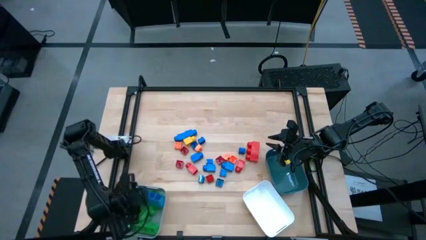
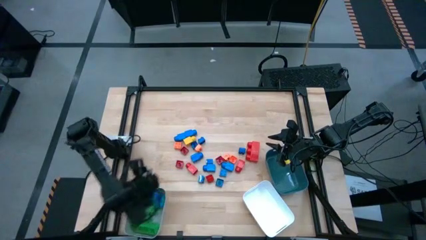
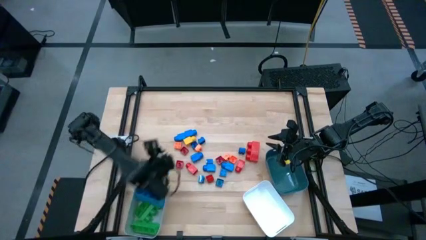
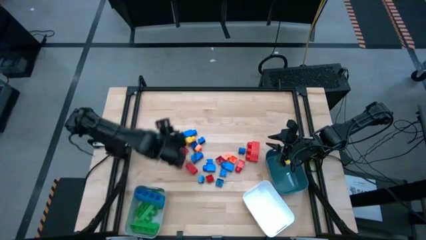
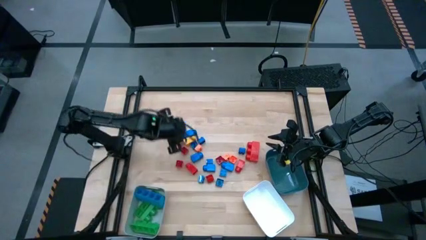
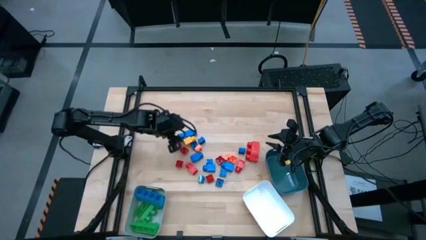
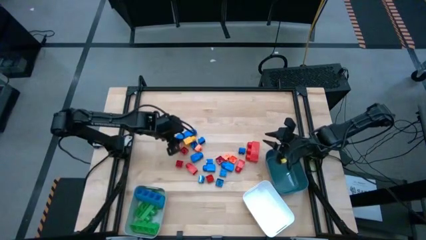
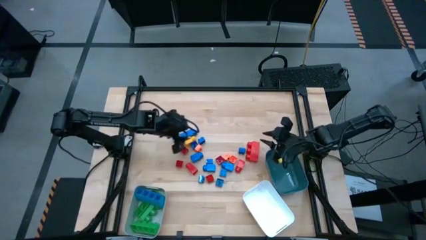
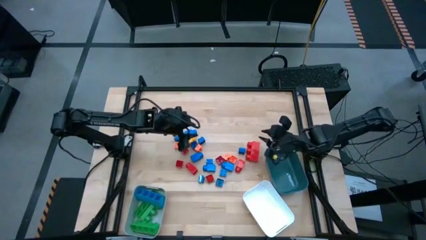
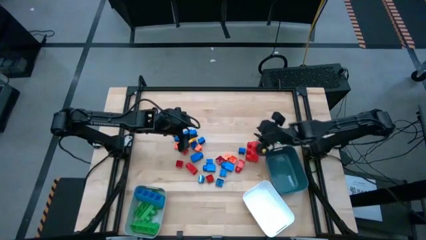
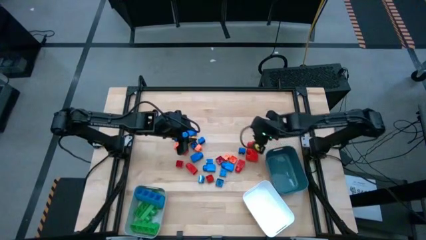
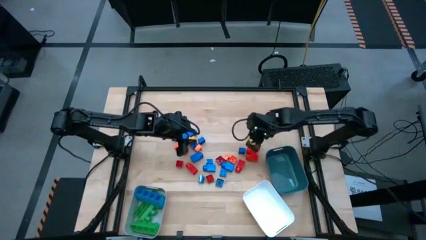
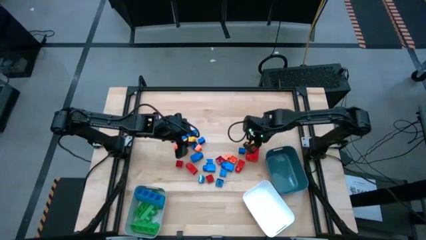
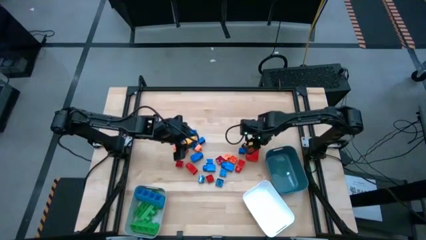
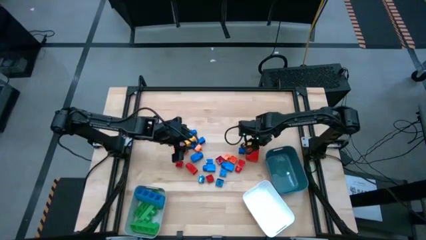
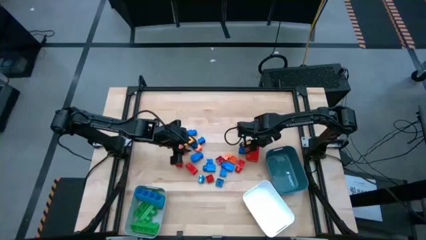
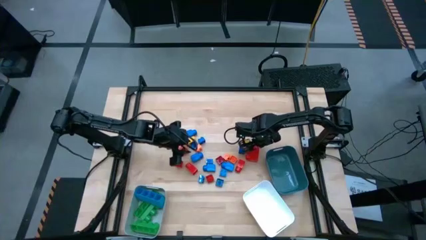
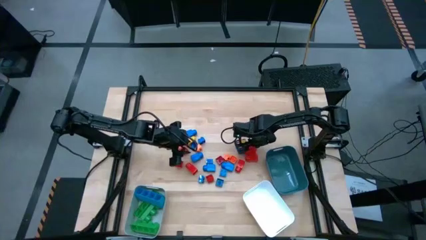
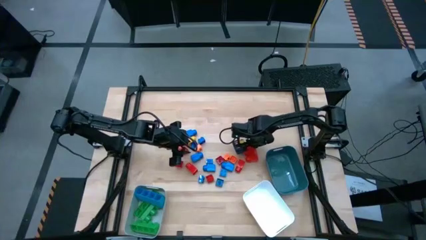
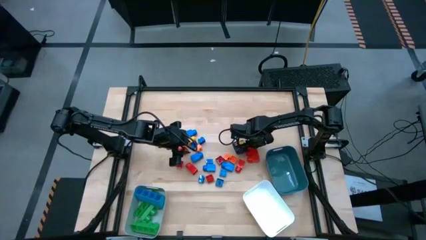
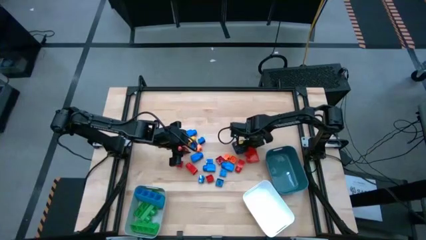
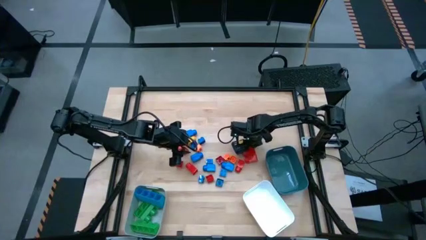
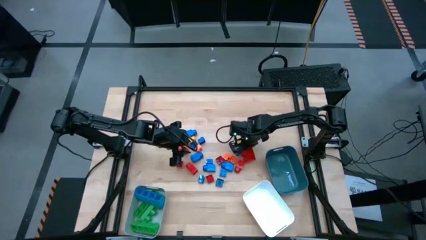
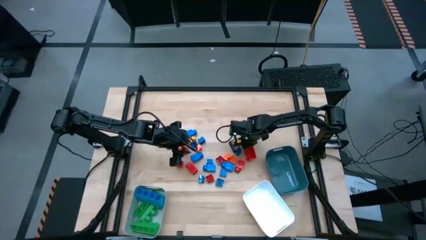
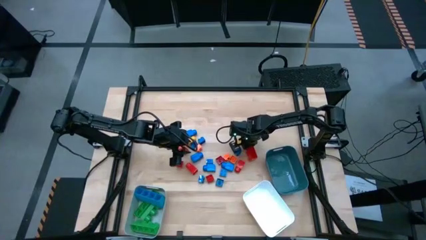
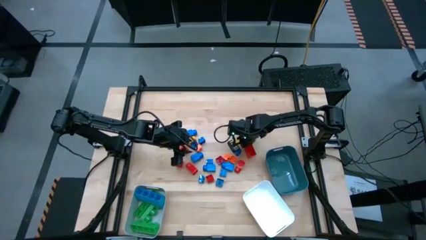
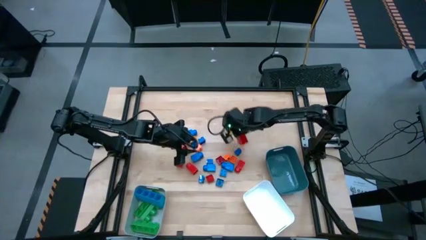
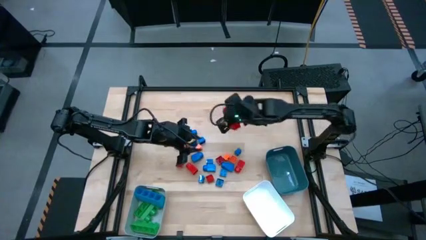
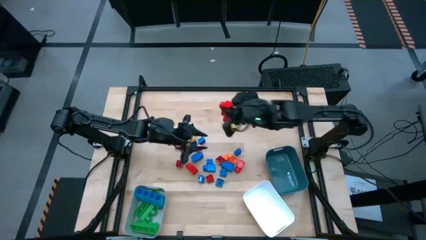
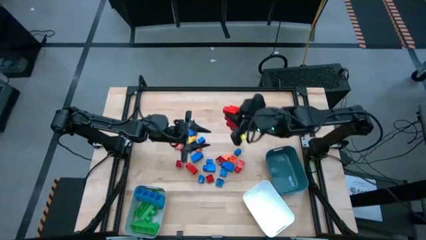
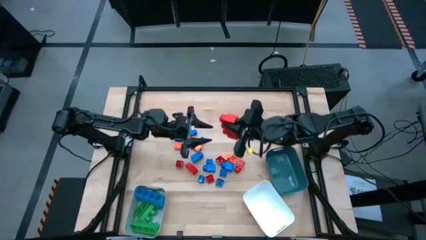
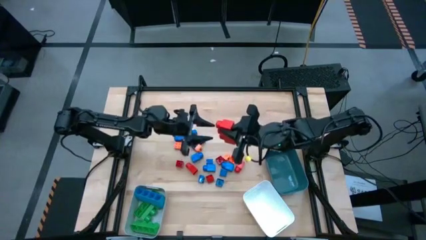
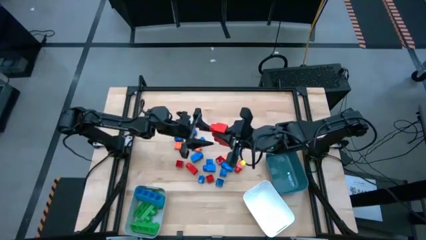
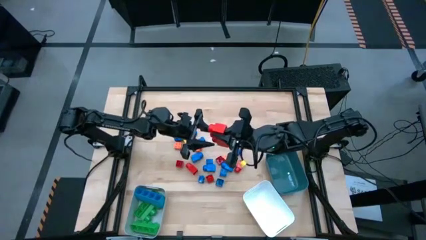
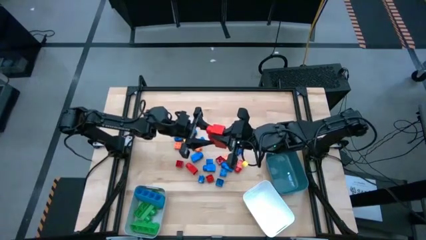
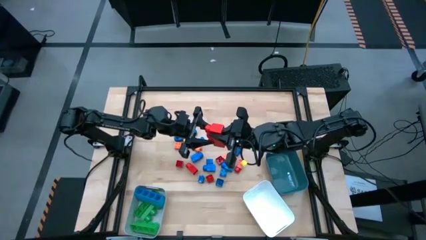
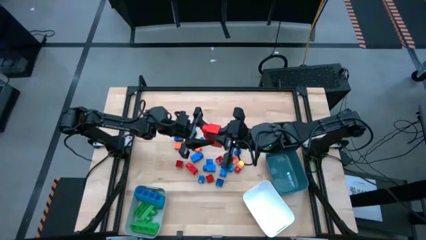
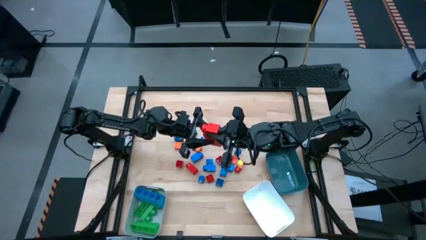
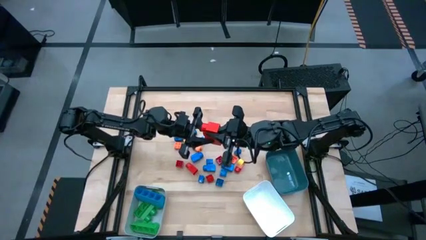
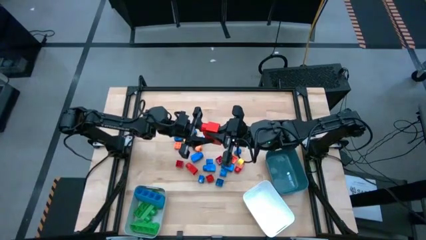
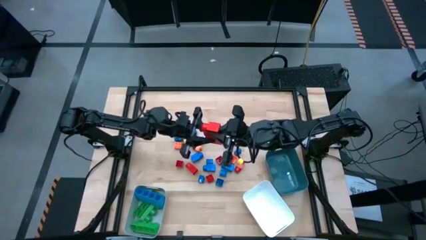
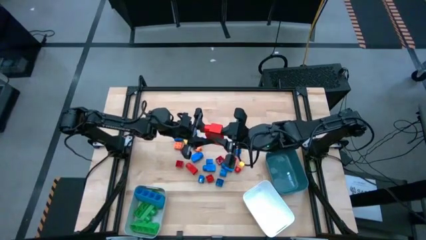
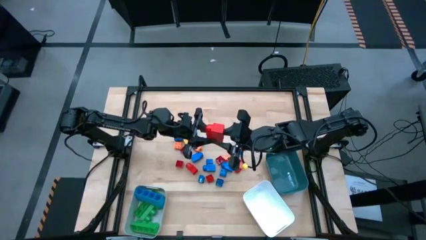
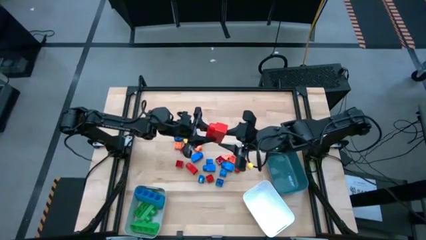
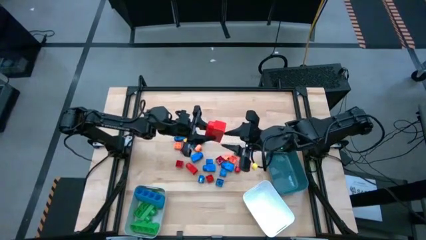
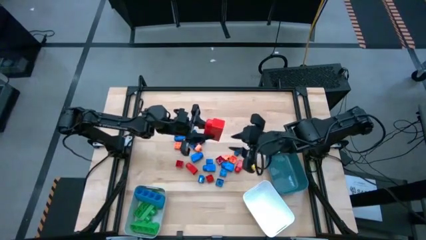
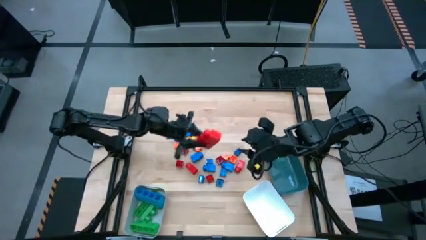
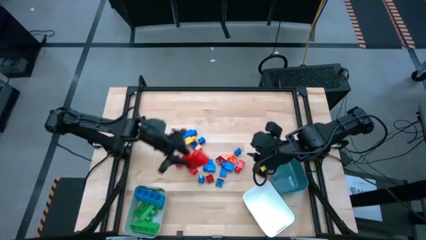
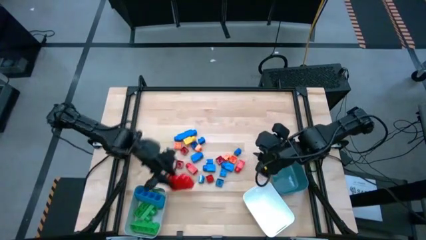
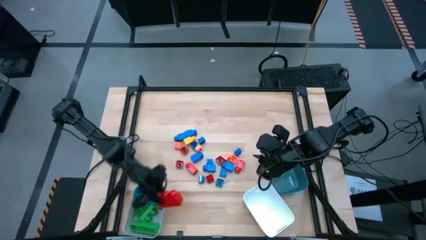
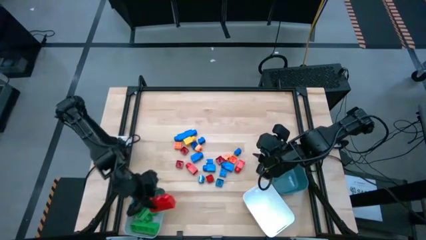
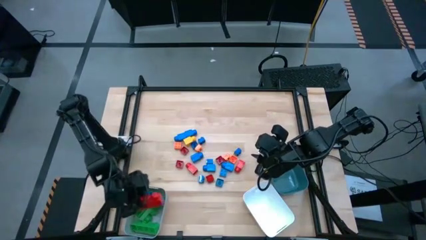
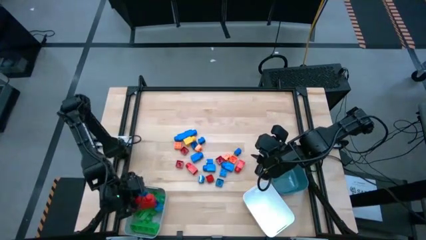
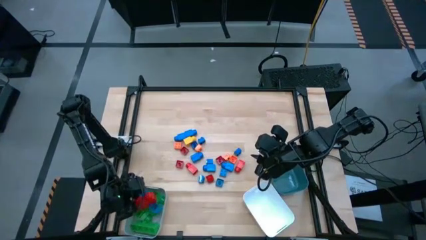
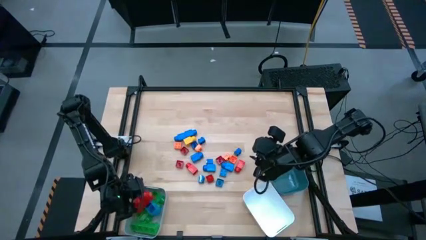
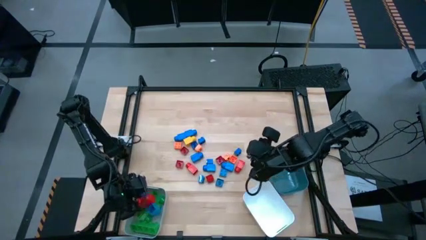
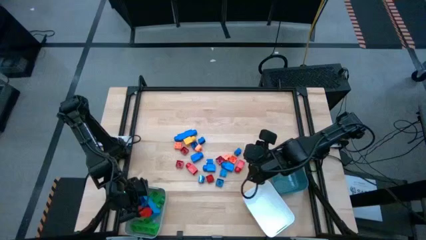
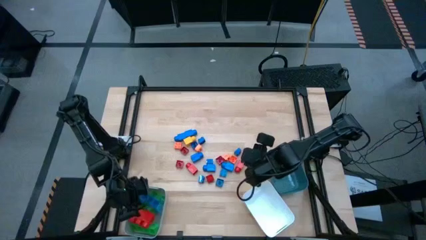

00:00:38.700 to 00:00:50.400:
Task: Sort blocks by size
Put the rectangular red game piece into the gray bin

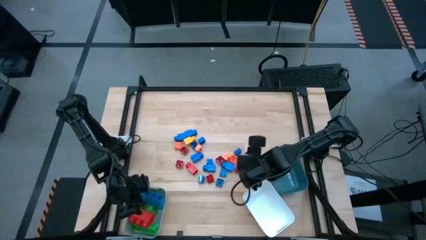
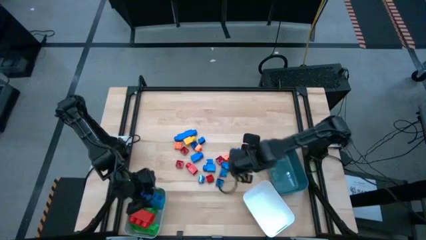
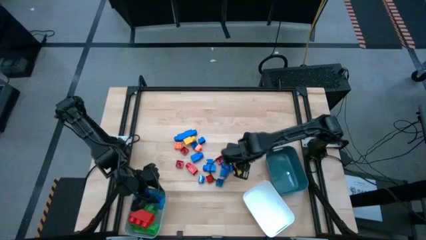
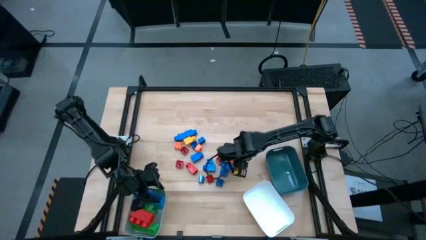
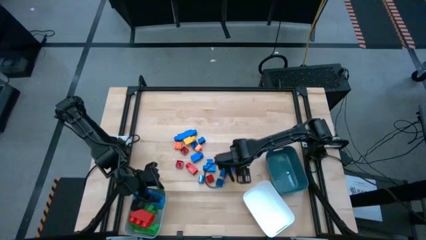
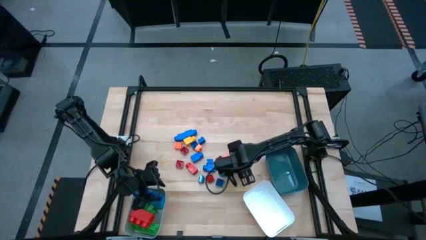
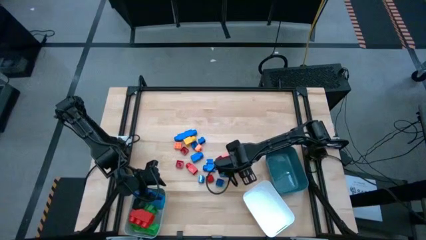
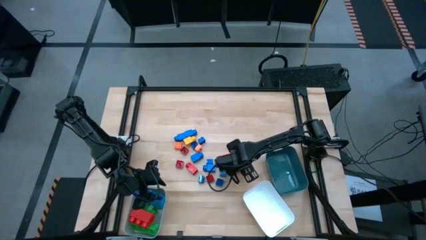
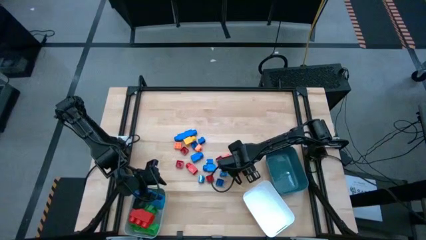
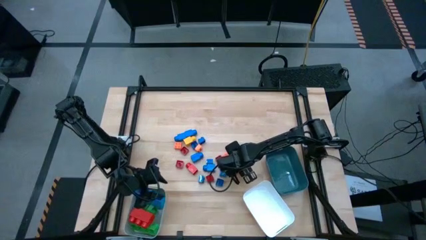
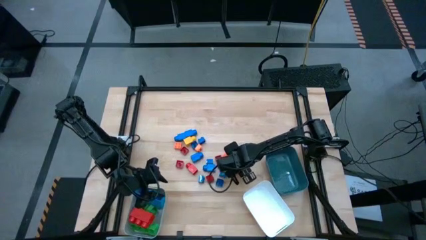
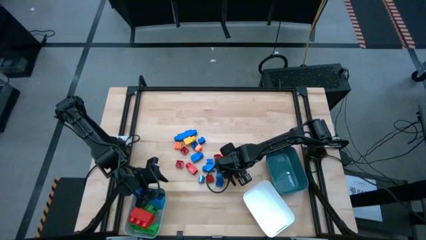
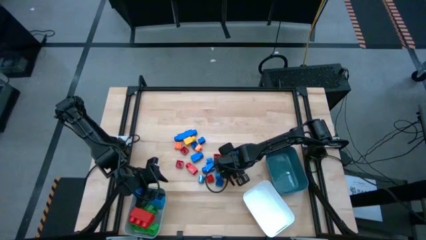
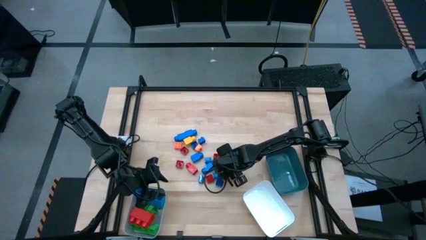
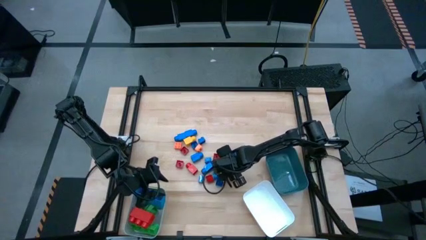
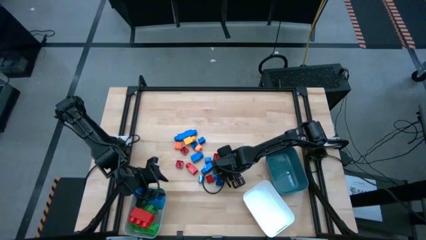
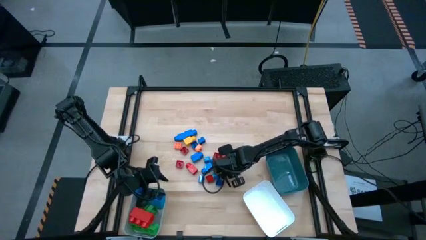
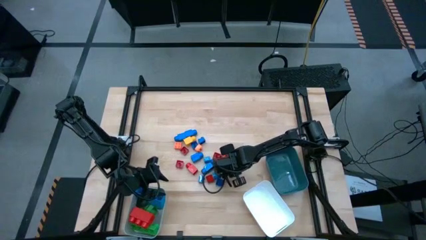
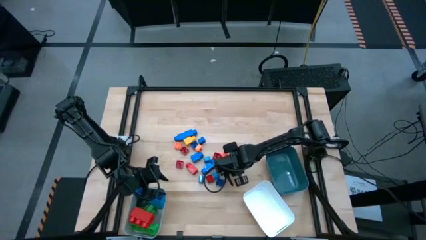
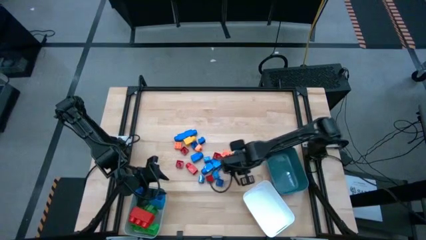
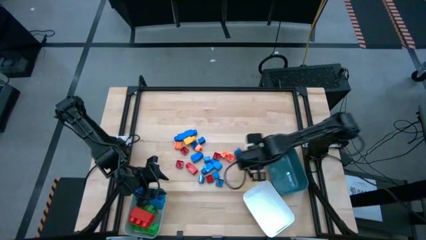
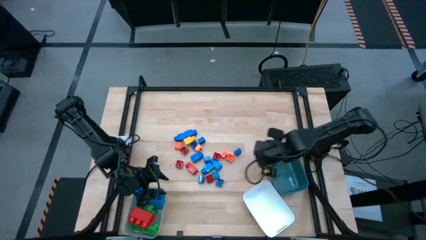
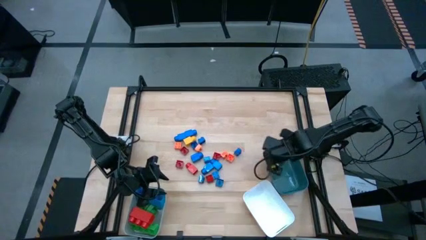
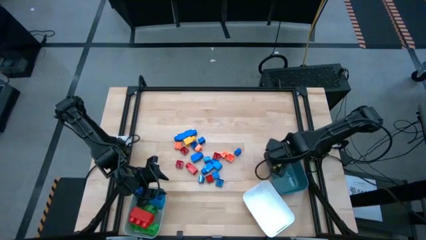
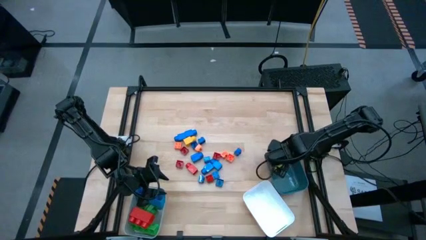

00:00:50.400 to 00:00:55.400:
Put the big square red game piece into the blue bin
